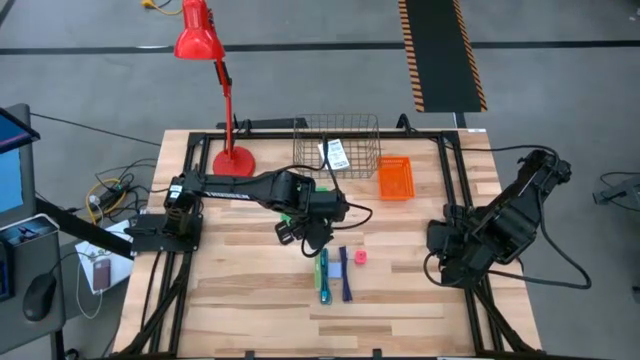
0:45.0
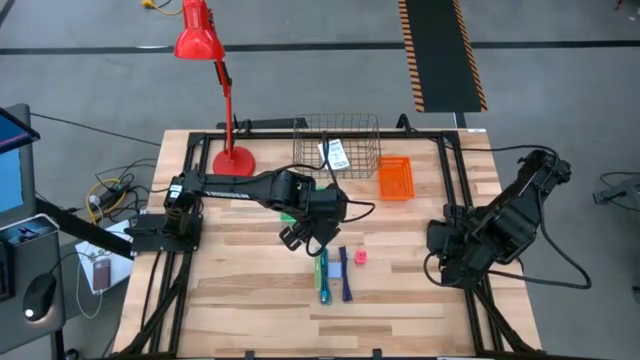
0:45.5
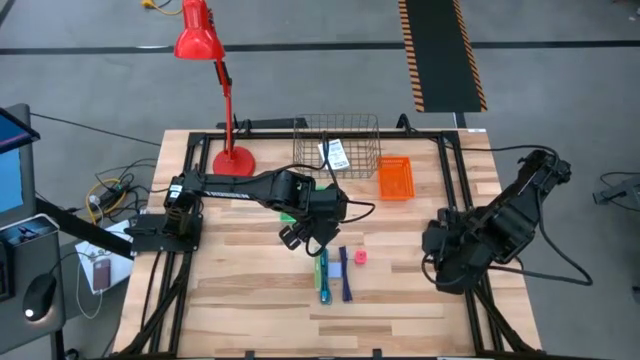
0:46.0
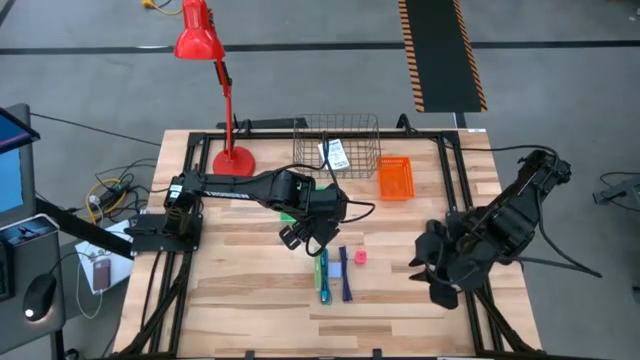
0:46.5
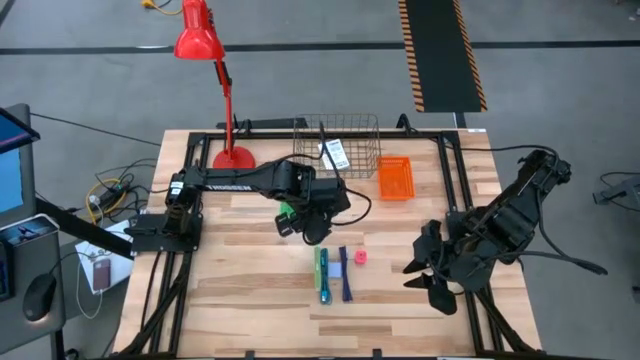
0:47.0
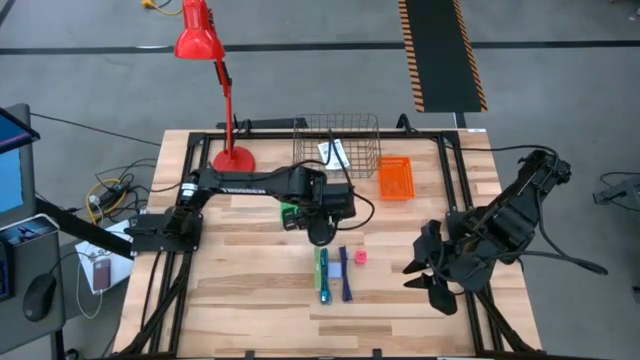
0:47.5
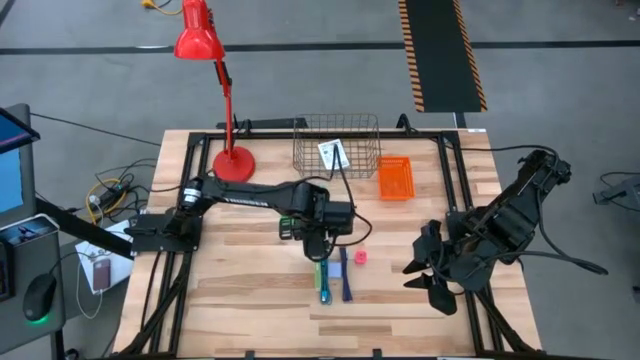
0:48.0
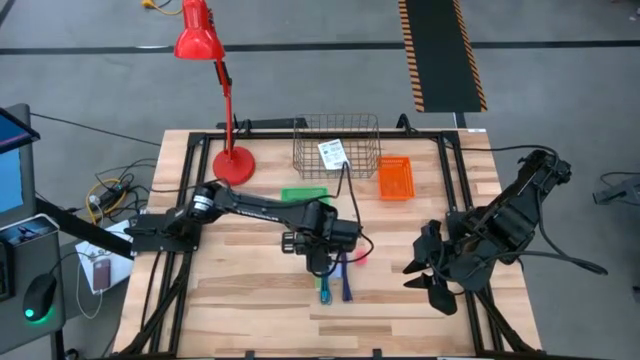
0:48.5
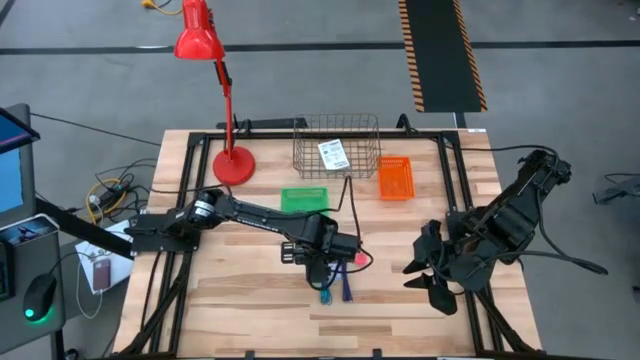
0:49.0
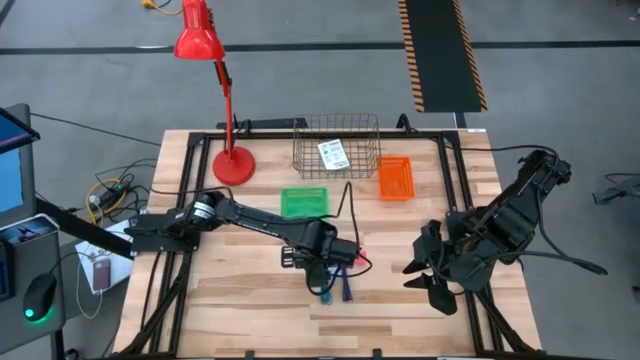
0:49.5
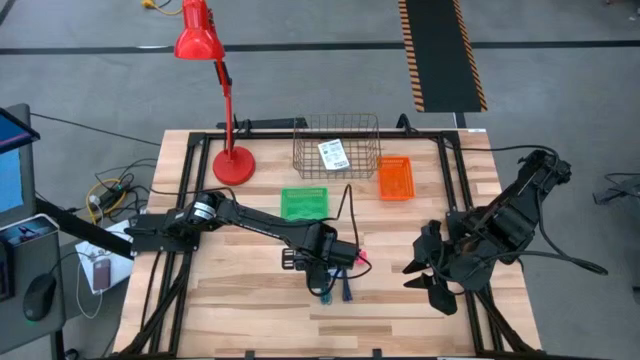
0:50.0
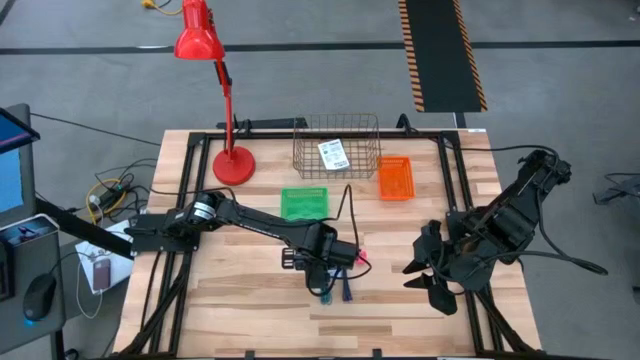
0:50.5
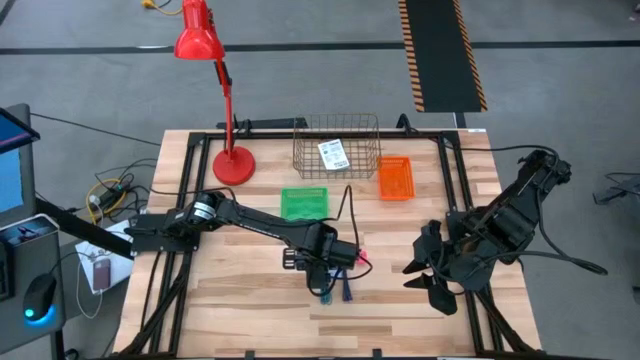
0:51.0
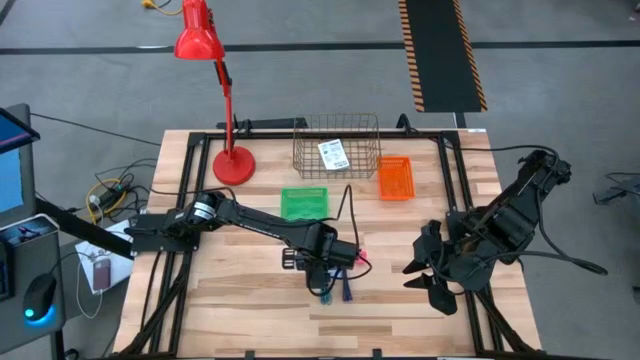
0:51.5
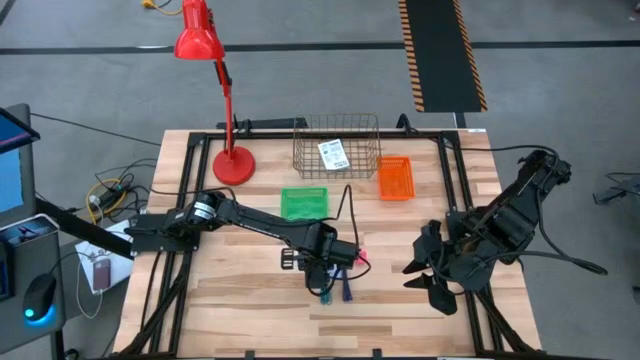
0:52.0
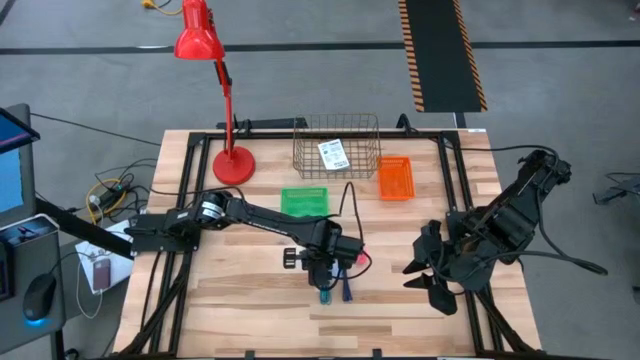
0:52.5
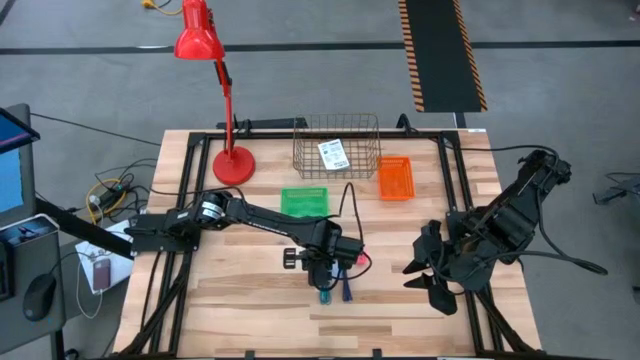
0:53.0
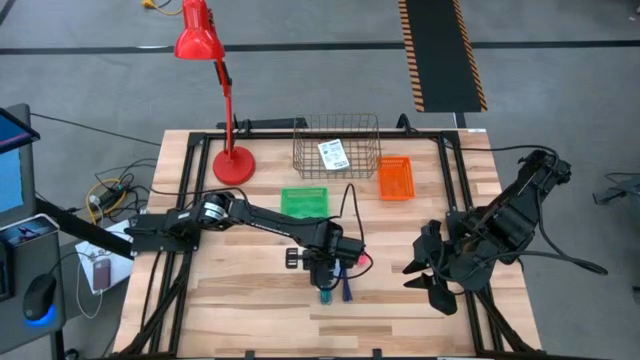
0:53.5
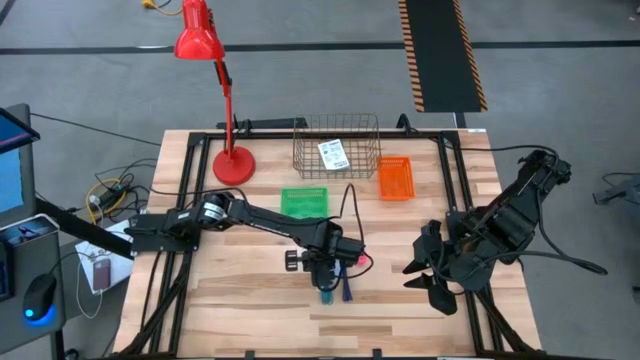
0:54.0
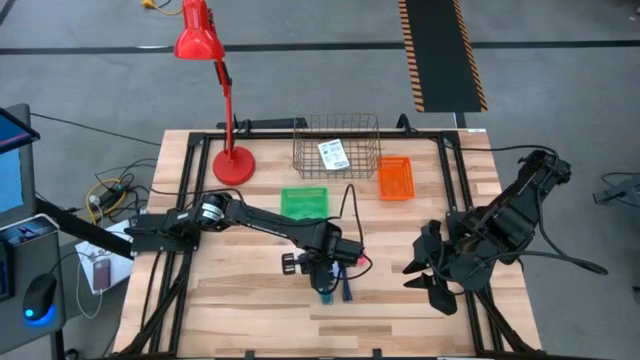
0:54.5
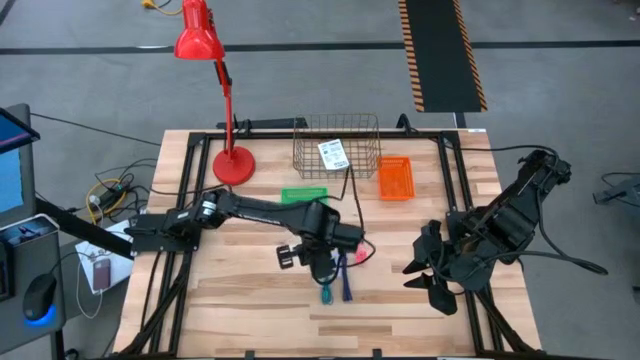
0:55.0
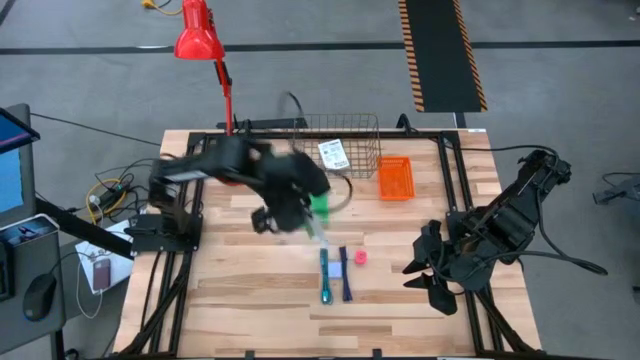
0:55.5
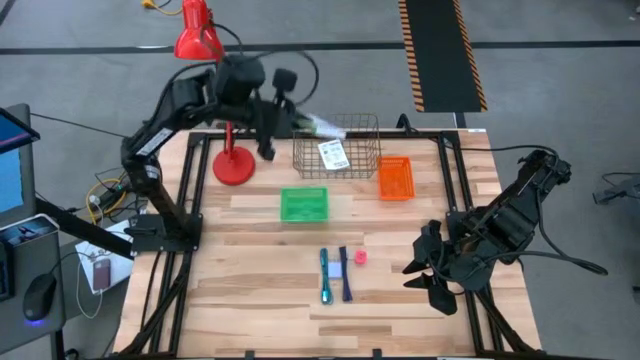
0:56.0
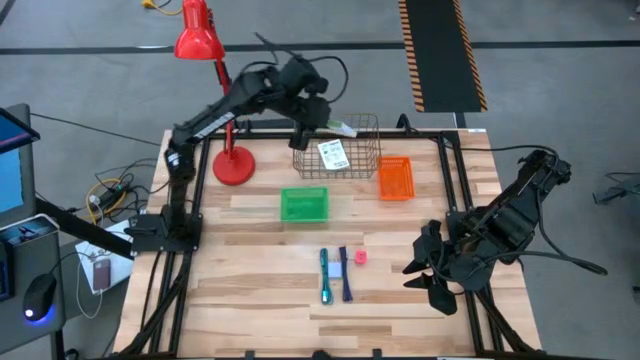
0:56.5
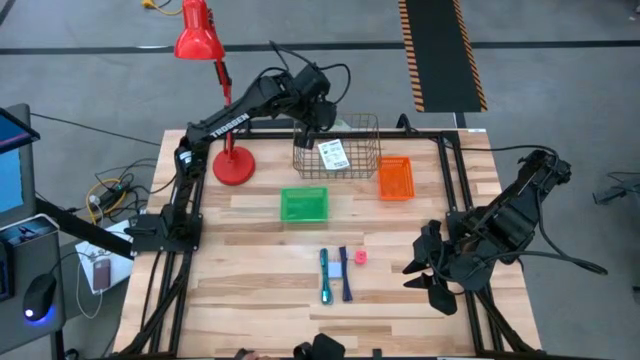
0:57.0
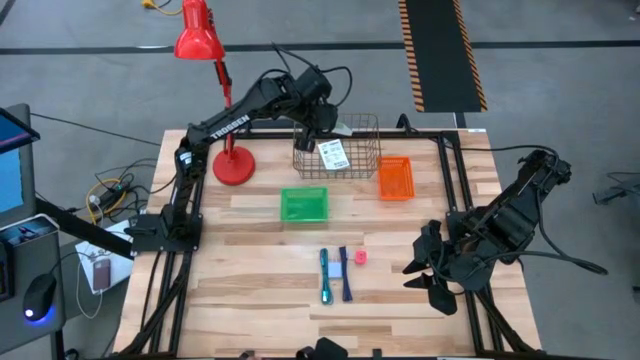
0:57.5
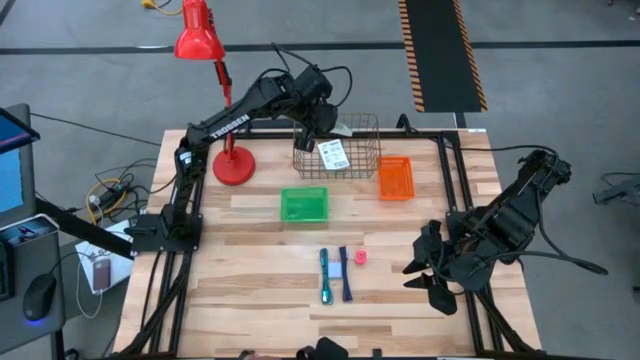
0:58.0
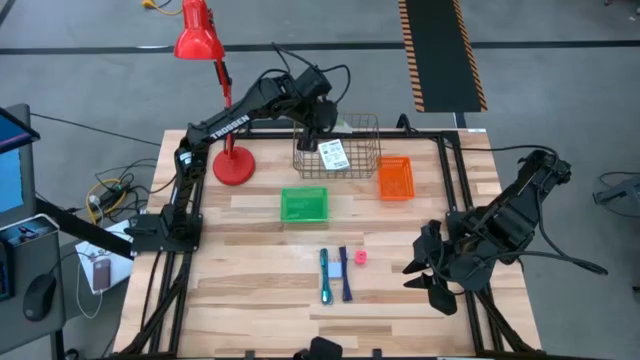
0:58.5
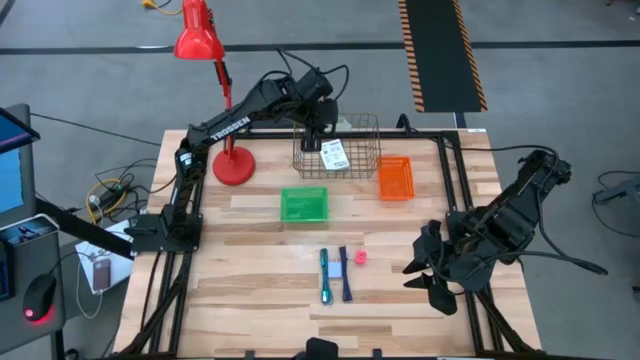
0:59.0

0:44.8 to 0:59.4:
Task: Pick and place items into bin
Put the white card reader box into the gold wire basket

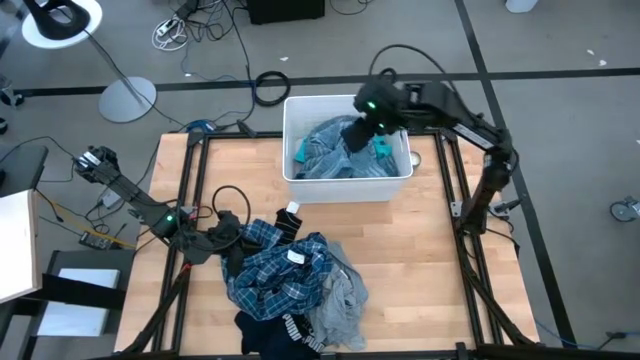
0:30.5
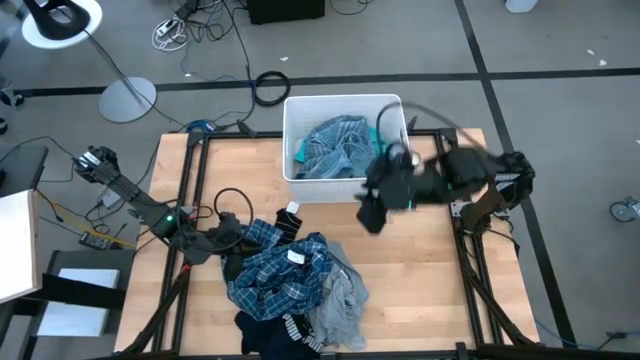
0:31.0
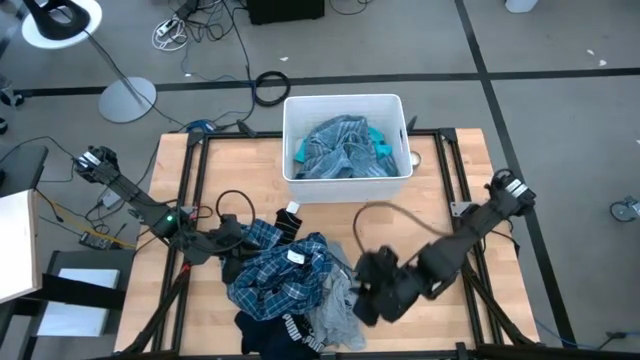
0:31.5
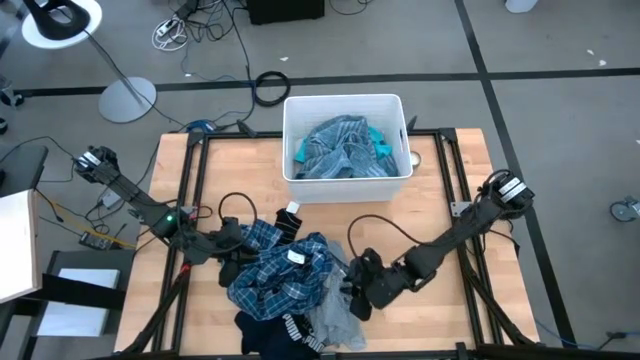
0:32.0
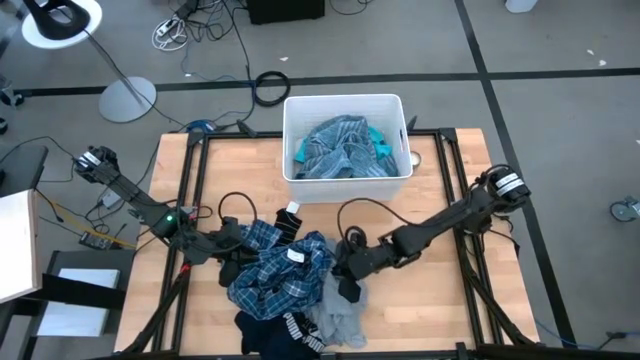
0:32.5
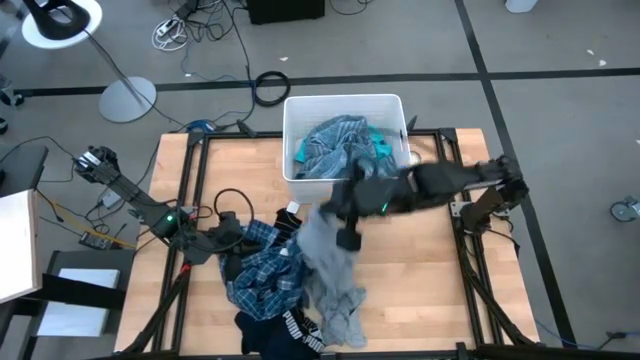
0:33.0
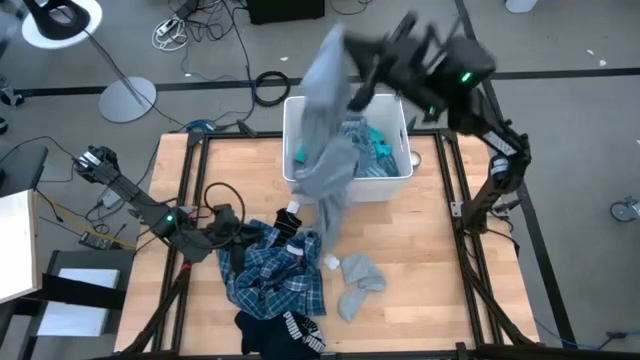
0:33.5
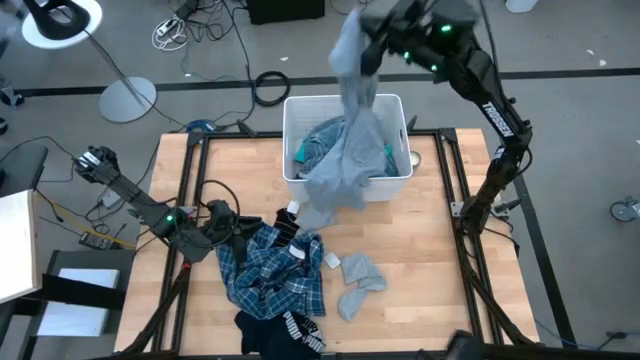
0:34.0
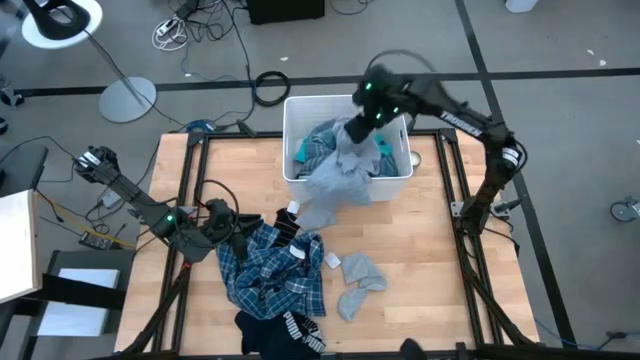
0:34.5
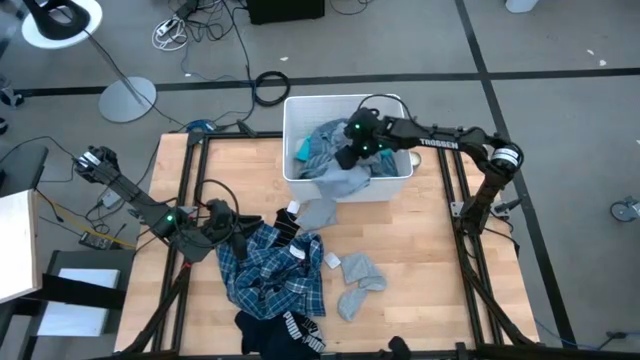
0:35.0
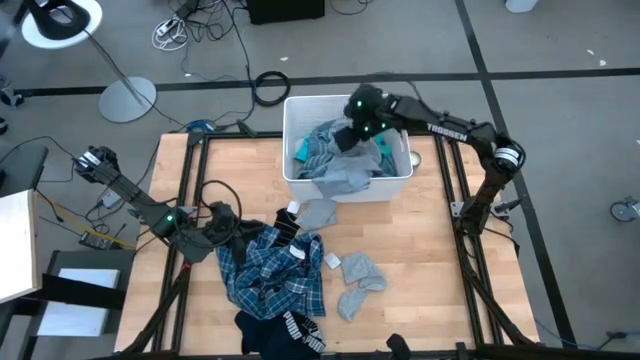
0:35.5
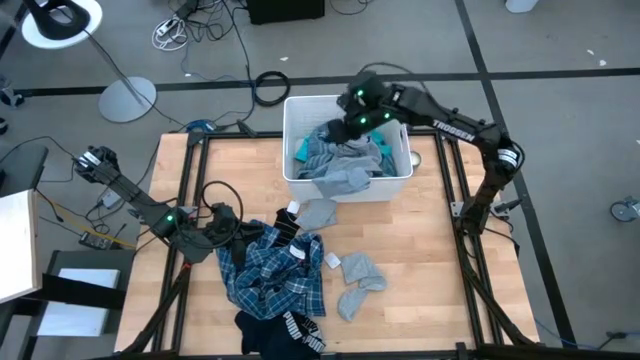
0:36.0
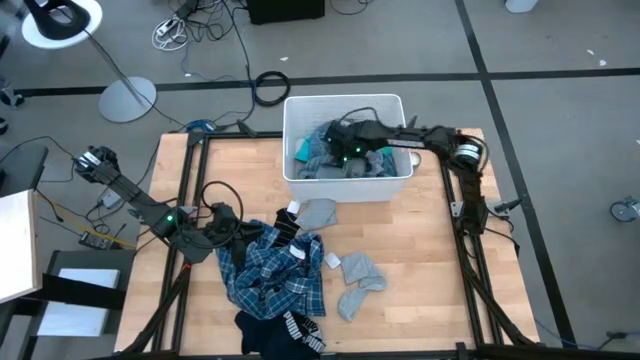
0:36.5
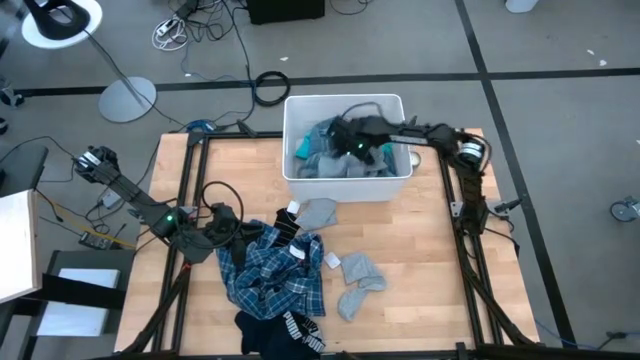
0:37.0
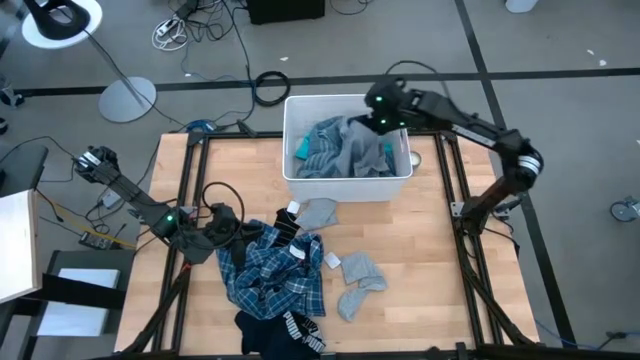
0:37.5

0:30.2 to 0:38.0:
Task: Sort clothes
Put the gray shirt into the laundry bin
